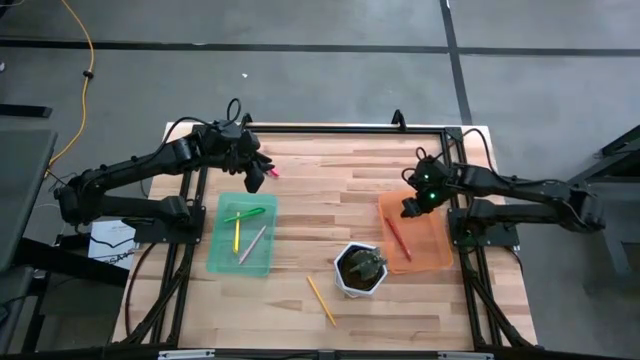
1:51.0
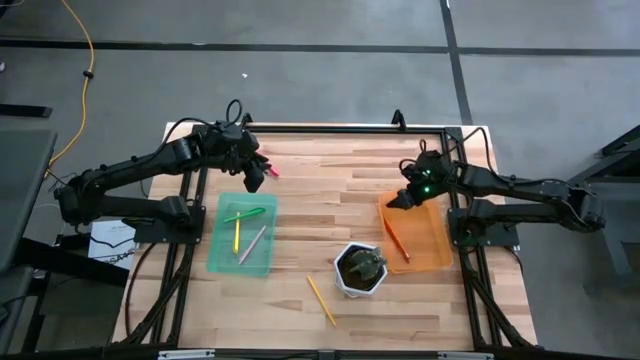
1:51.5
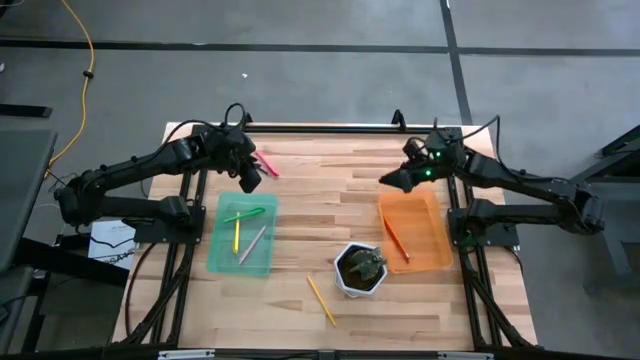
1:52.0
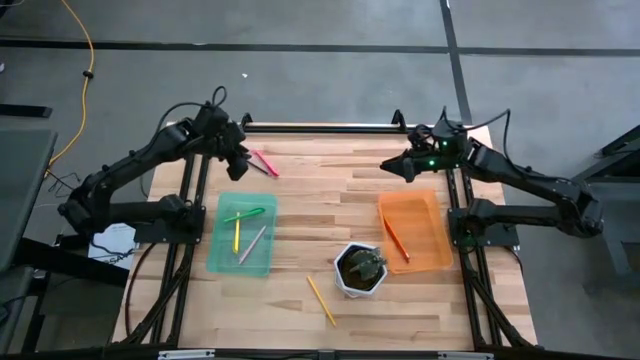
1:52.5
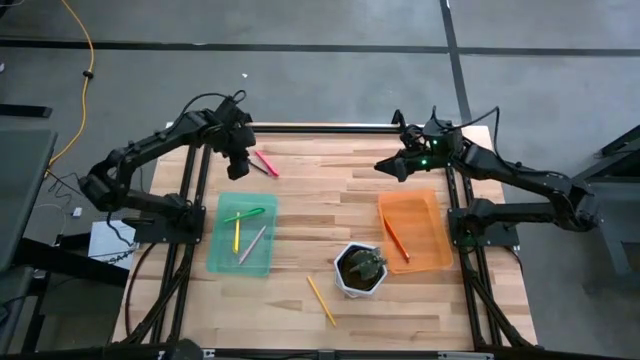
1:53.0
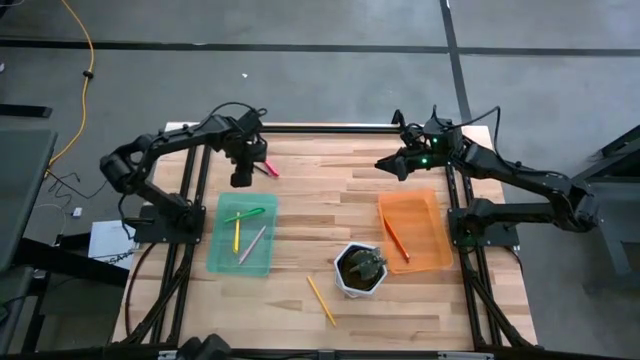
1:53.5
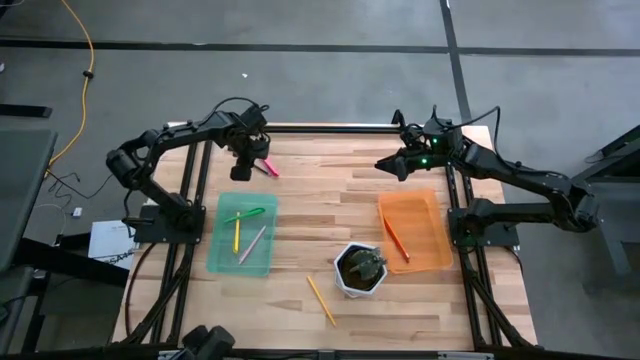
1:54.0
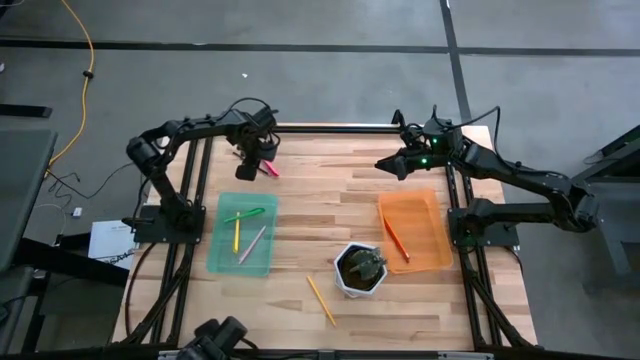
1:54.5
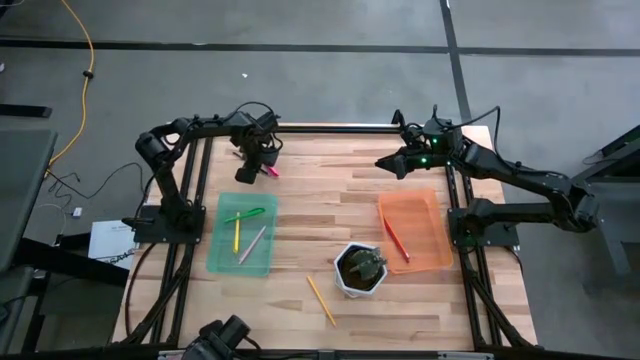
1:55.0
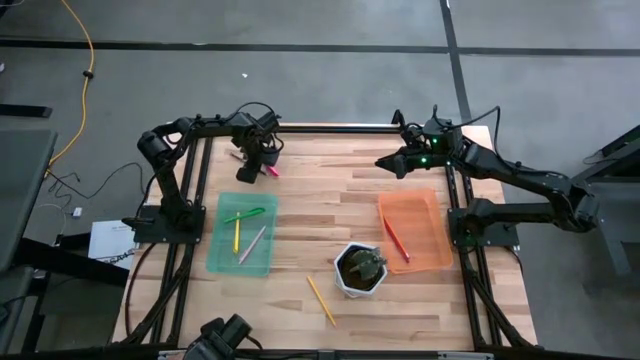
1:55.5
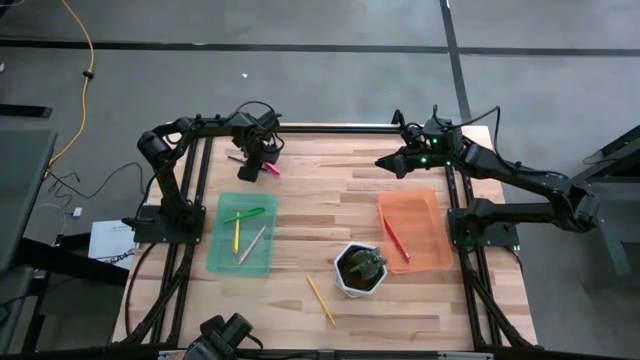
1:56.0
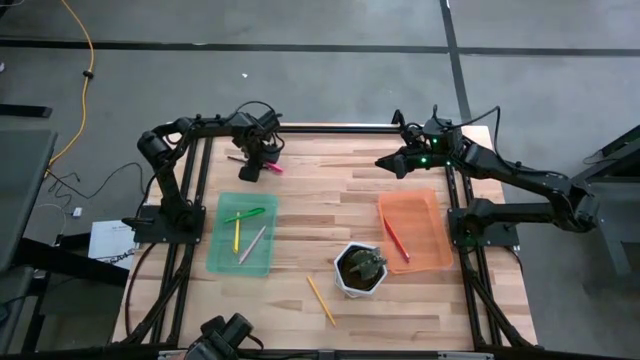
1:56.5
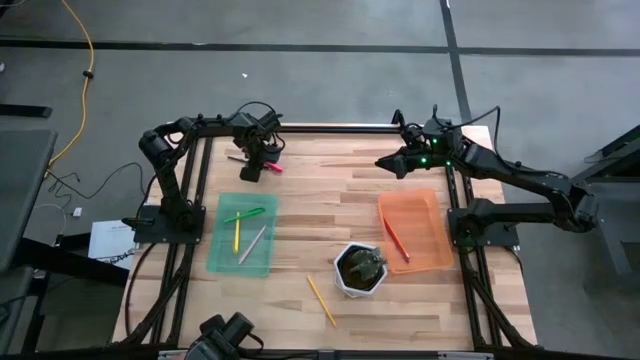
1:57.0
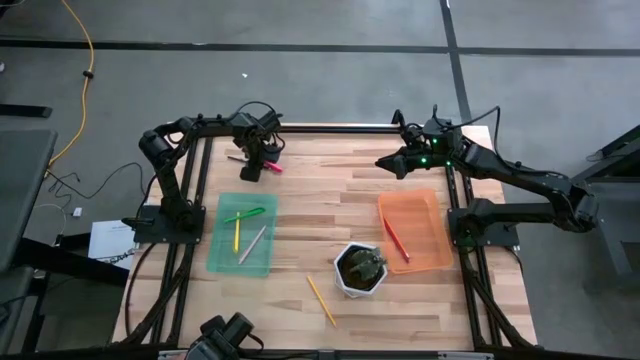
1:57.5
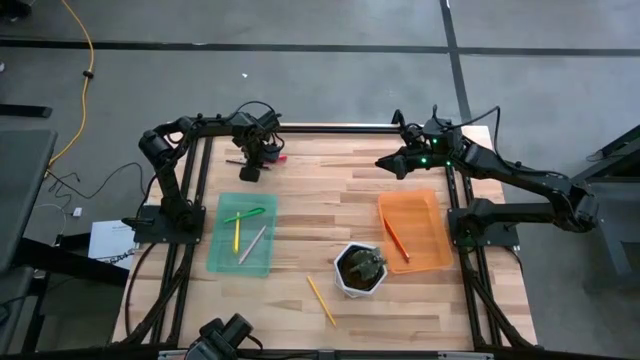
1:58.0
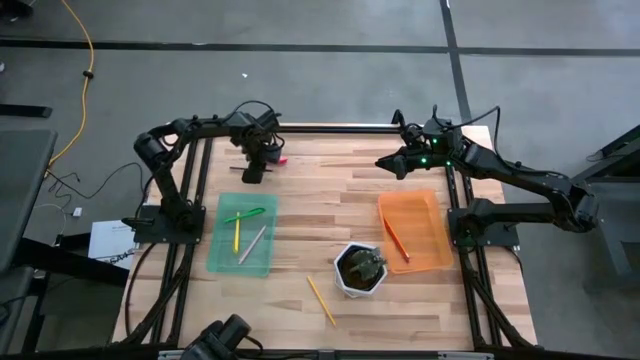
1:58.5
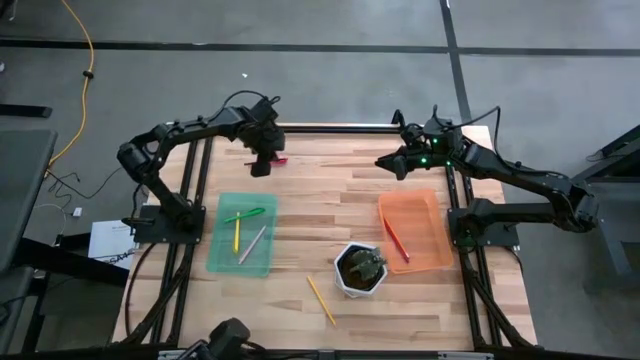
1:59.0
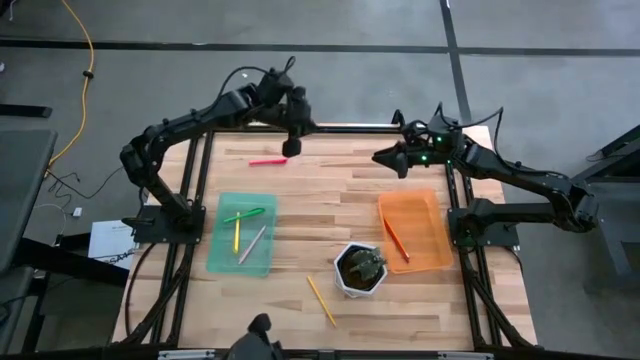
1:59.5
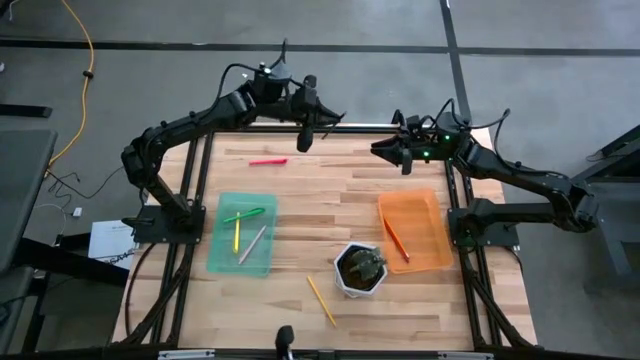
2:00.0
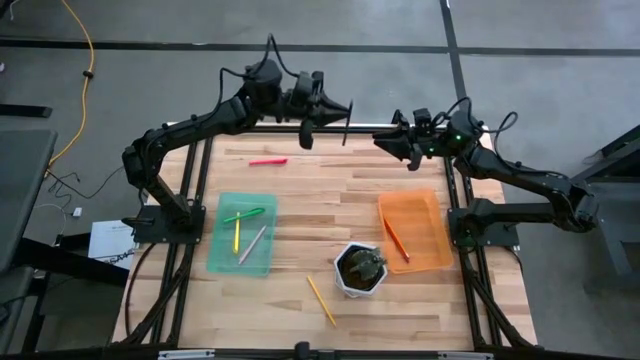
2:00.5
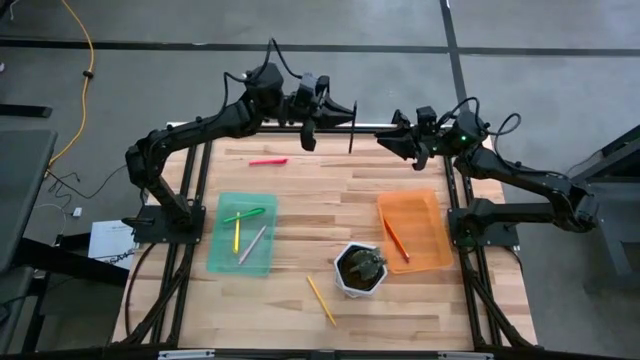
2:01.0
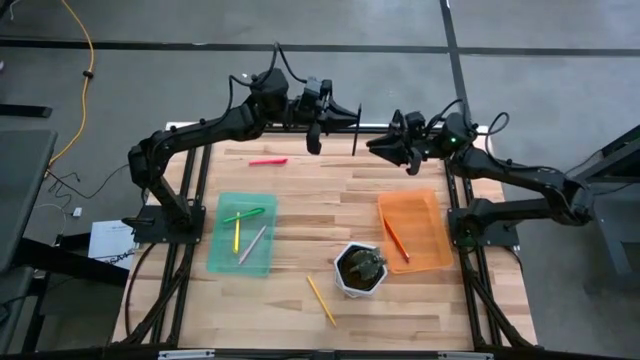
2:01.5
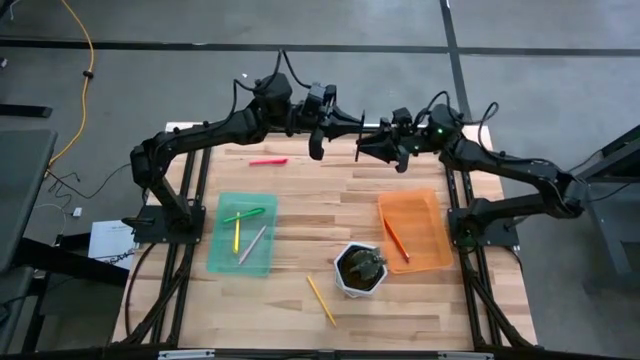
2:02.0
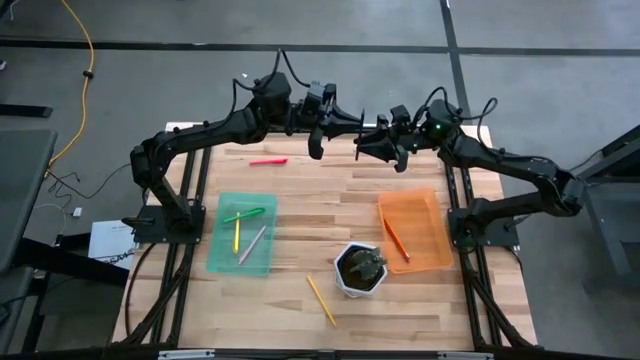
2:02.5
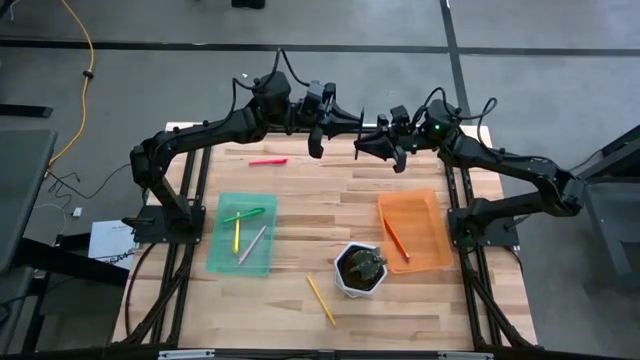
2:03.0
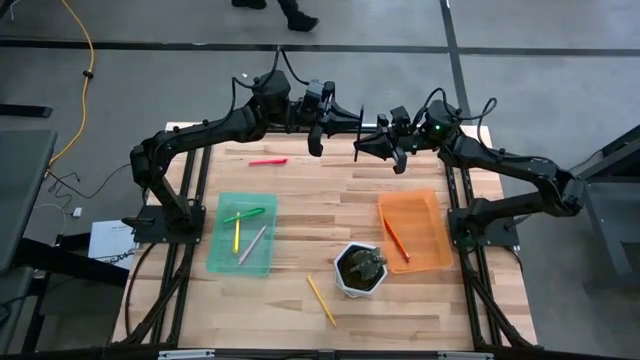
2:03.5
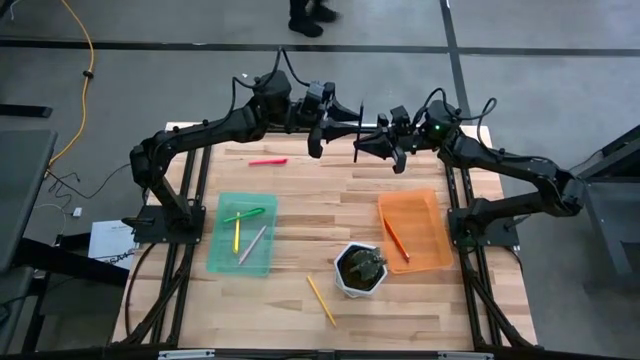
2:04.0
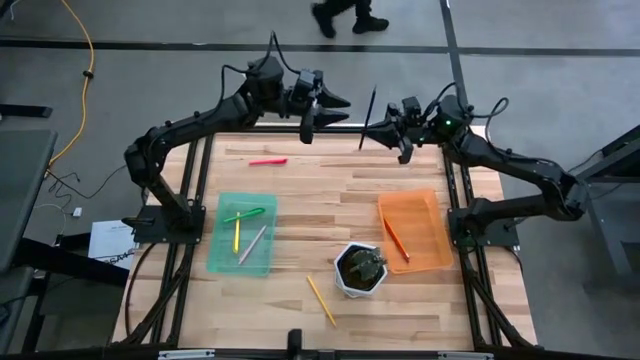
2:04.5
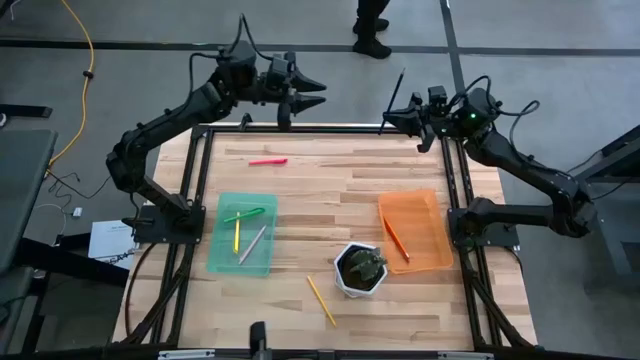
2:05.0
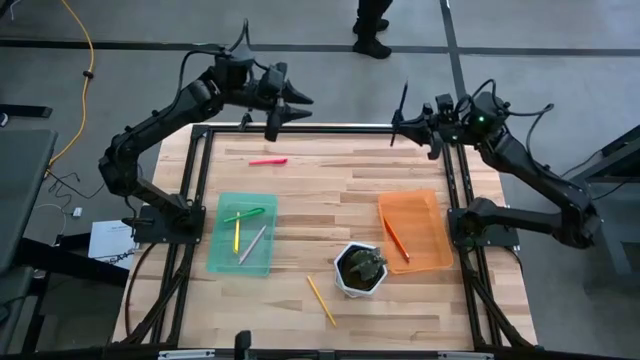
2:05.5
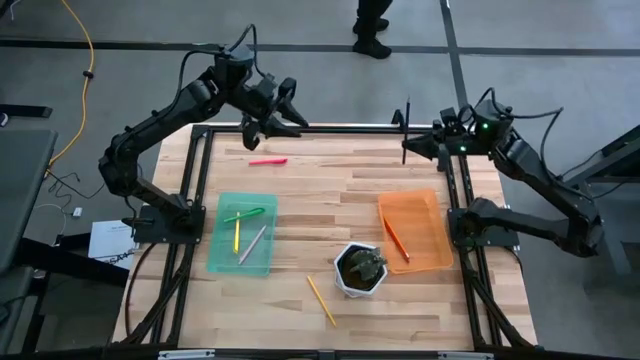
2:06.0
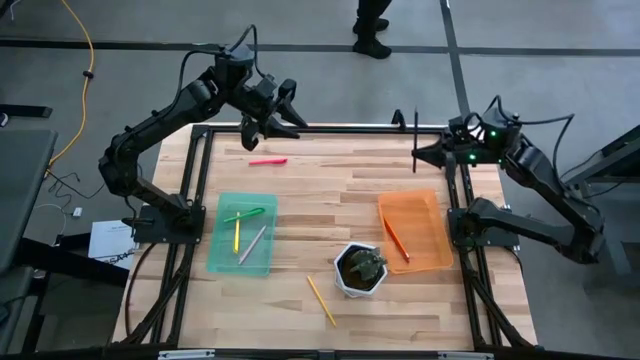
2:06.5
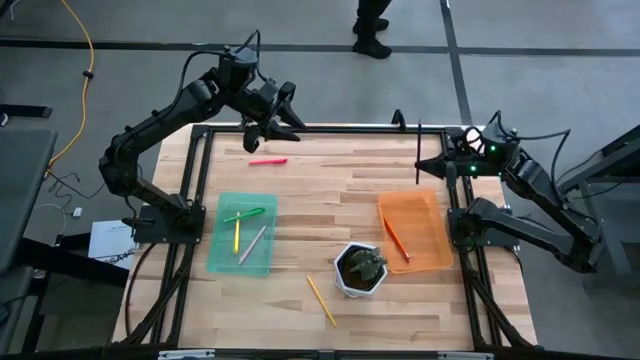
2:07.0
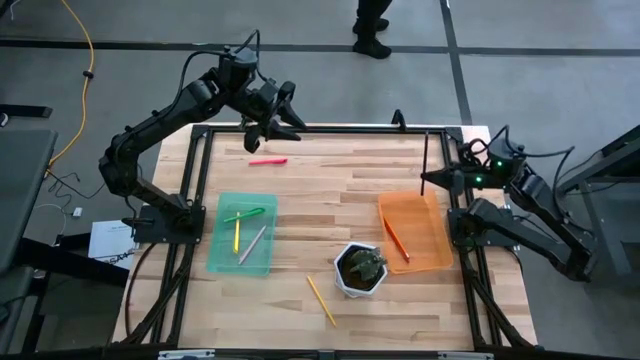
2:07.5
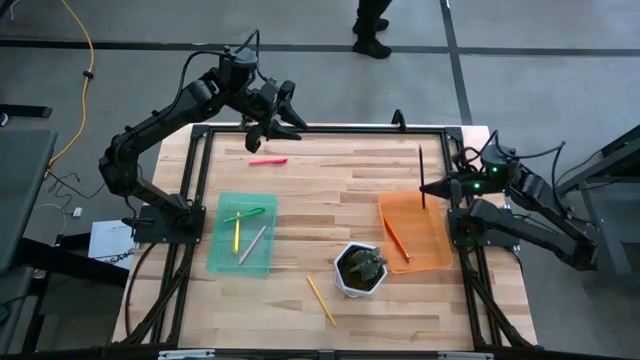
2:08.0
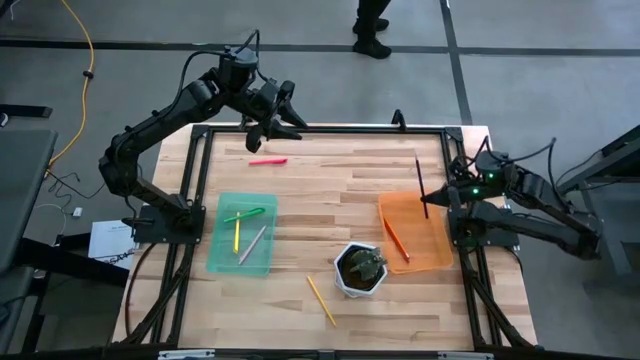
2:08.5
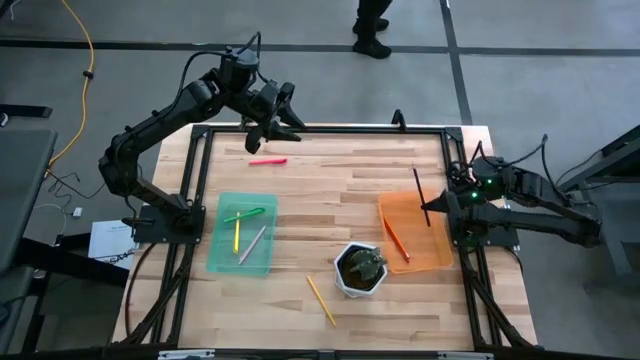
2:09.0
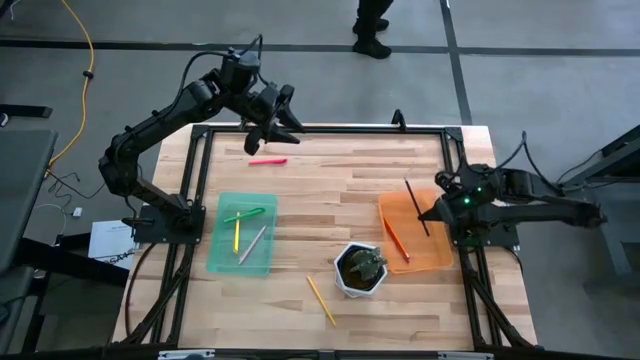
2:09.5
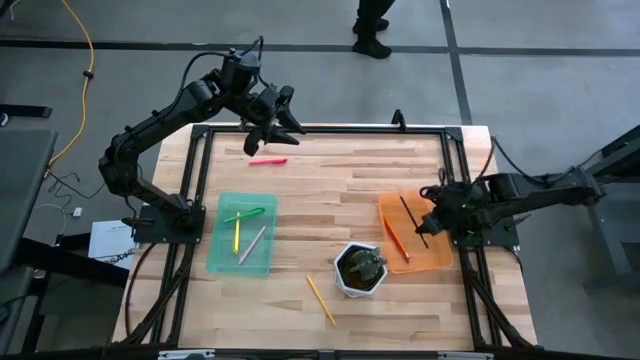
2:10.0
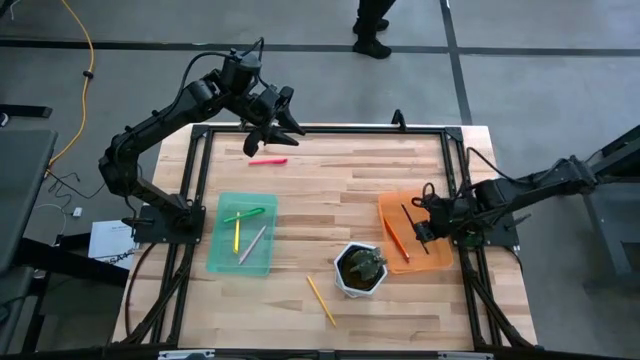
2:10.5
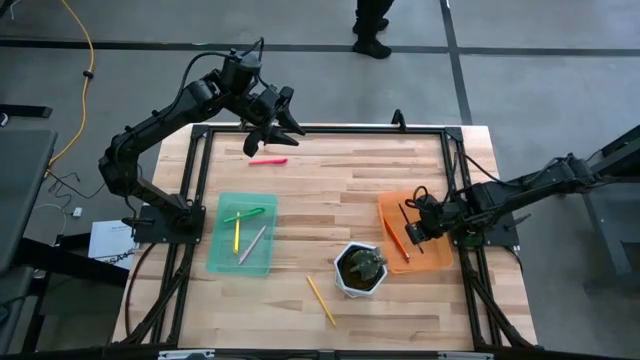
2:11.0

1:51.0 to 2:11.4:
Task: Sort pens & pencils
Put the blue pencil into the orange bin

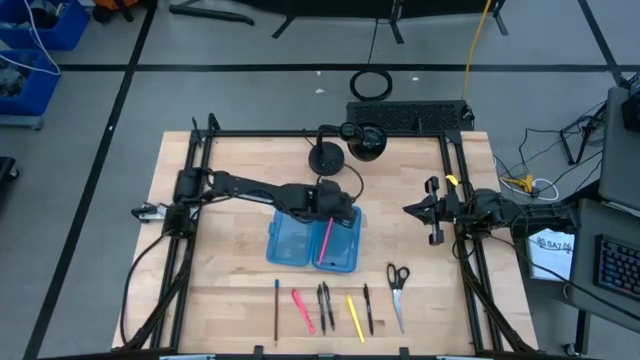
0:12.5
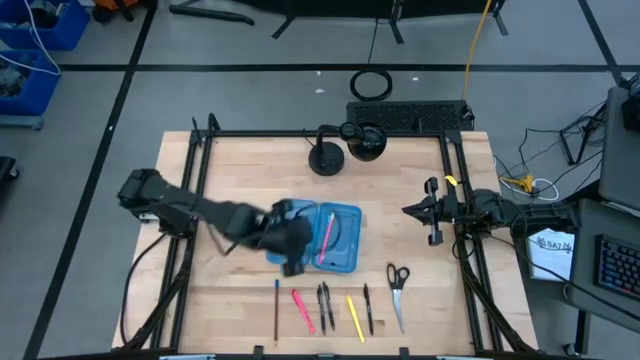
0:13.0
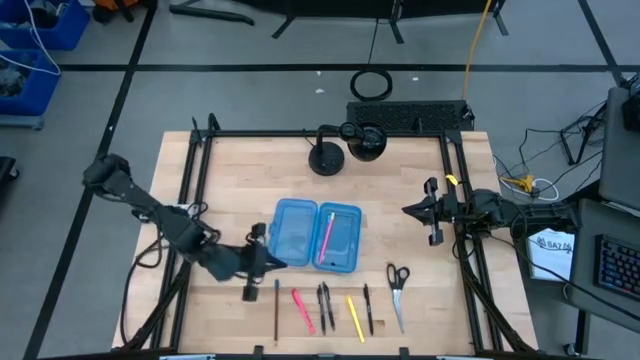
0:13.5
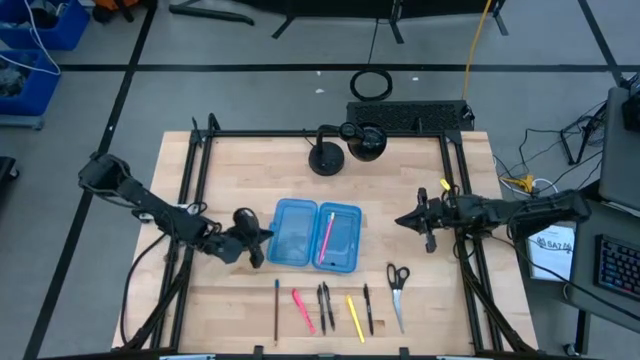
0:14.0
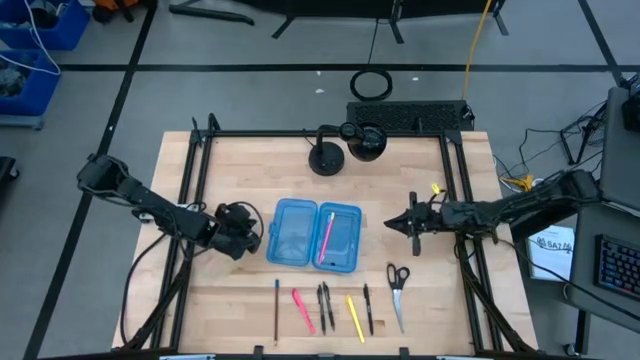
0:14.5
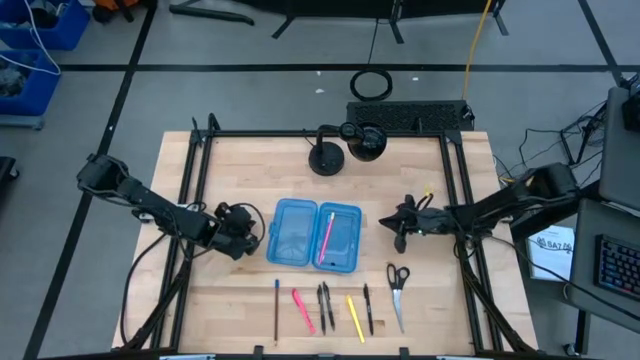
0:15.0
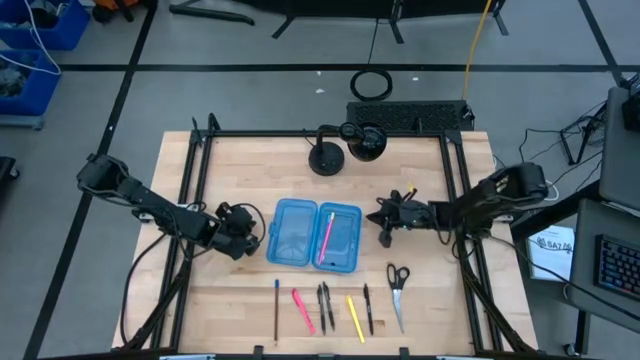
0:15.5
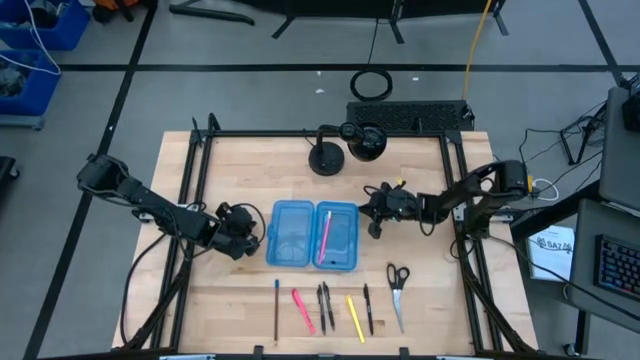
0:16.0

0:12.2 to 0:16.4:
Task: Pick & place school supplies into a supply box
Adjust the blue supply box on the table
